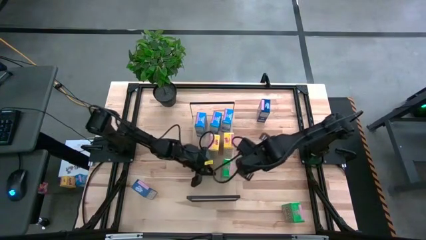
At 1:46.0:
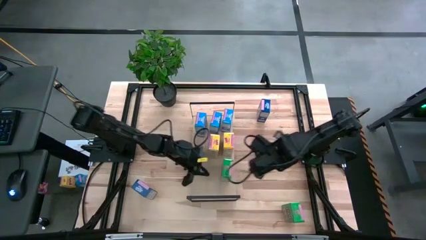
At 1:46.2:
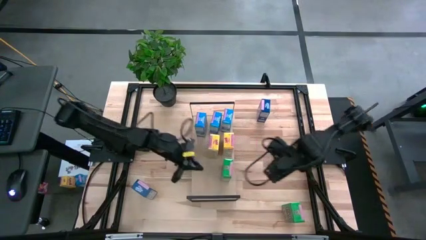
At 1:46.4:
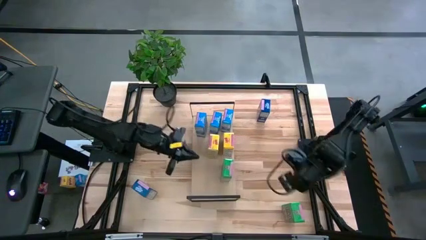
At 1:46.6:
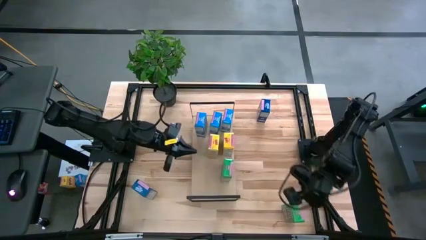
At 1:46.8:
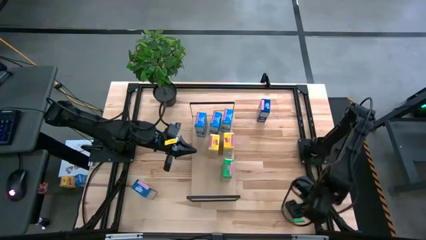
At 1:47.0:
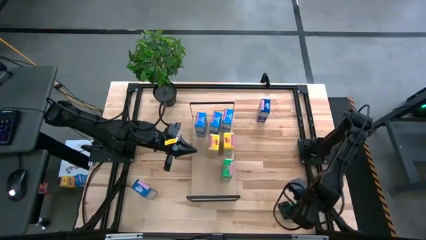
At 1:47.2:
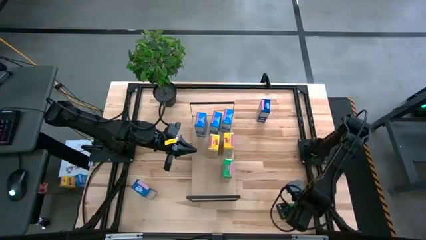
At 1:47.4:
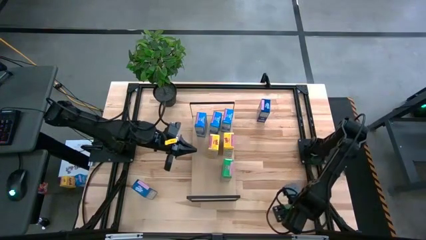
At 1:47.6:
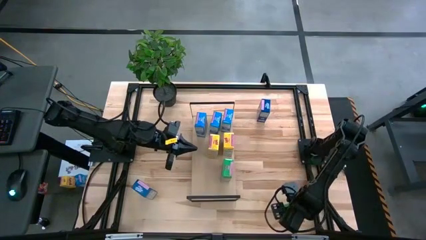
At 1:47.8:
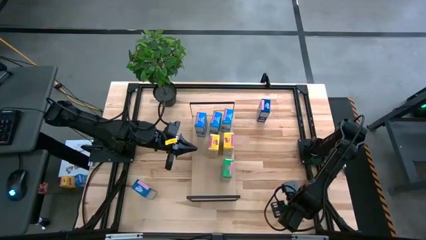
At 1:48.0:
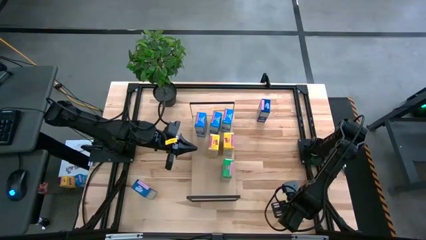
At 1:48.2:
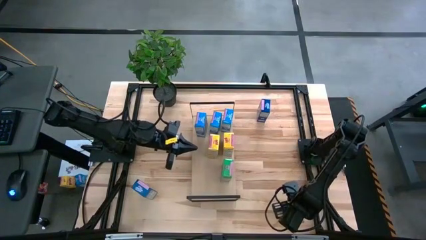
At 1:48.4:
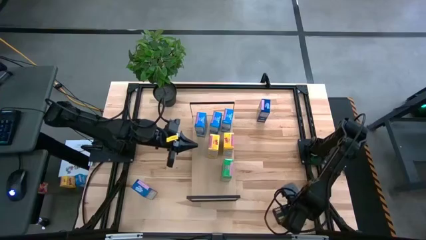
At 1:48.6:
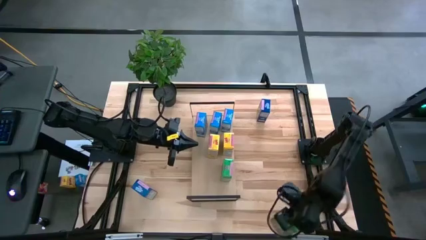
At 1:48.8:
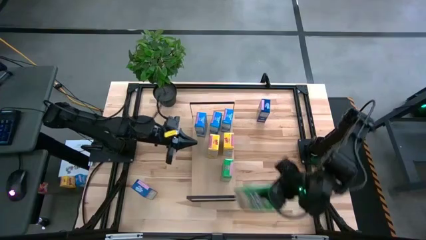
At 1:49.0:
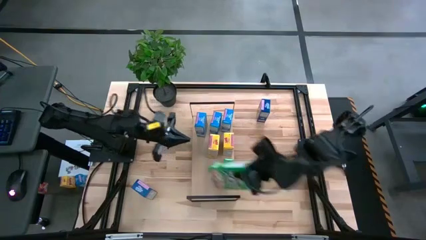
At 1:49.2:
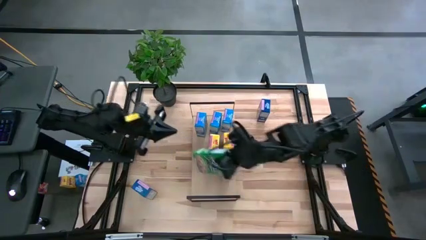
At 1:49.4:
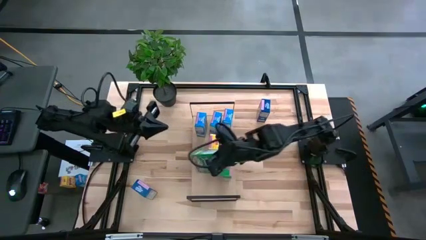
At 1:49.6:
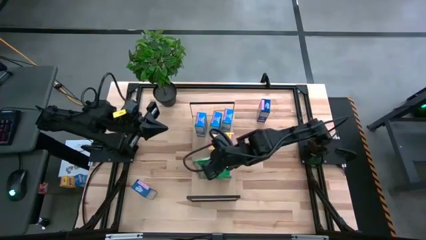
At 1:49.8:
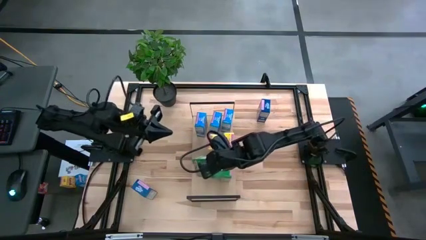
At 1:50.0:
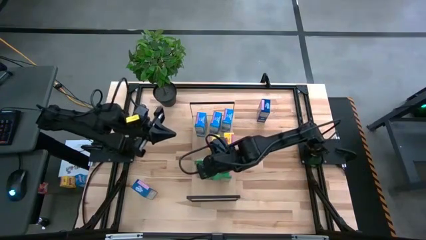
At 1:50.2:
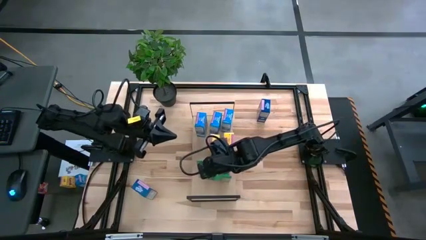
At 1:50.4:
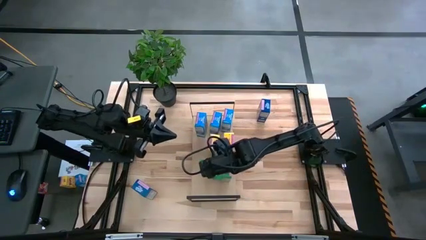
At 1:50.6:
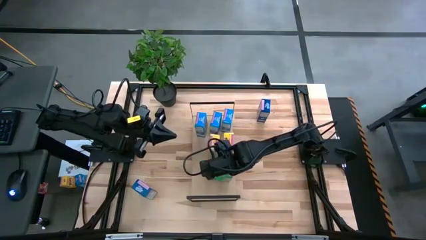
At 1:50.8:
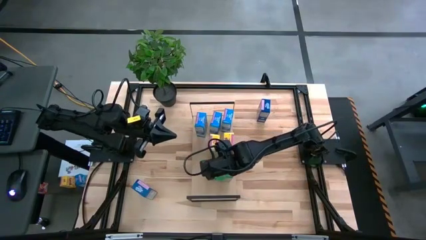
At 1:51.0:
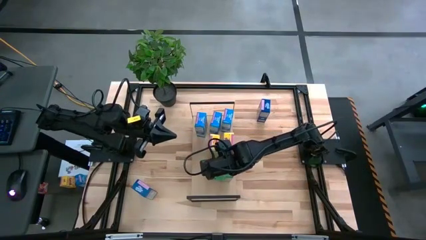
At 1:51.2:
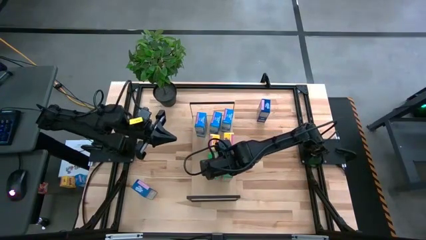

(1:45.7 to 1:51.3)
Task: Stack cereal on shelf
Put the green cereal box on the shelf aligned with the other green cereal box

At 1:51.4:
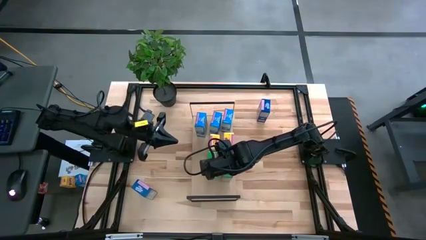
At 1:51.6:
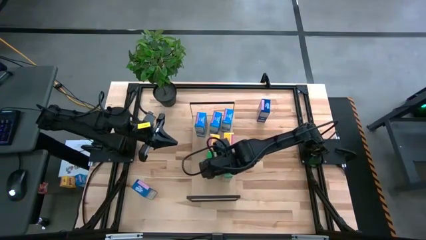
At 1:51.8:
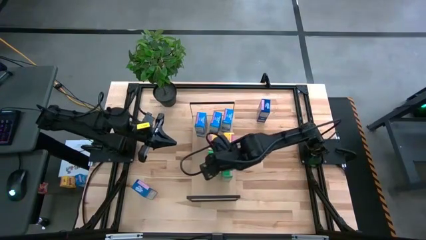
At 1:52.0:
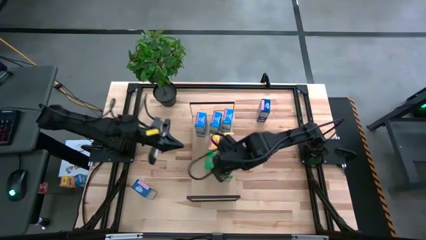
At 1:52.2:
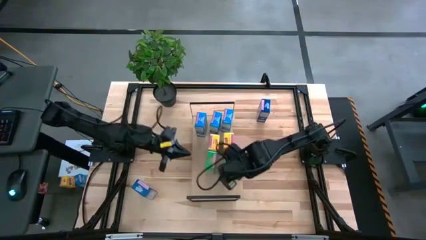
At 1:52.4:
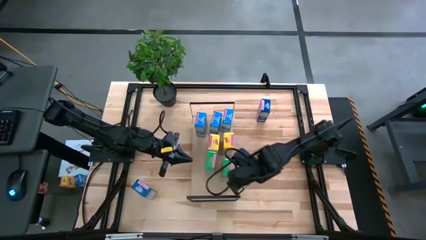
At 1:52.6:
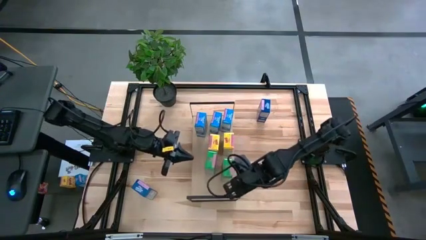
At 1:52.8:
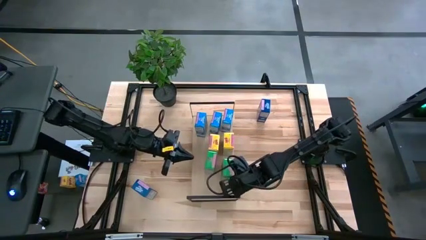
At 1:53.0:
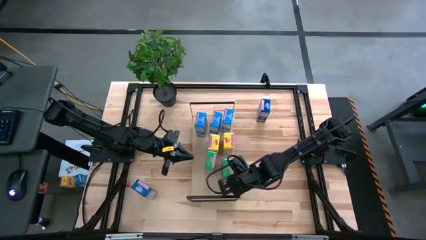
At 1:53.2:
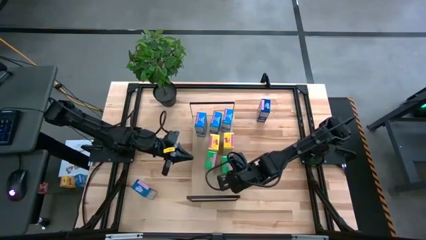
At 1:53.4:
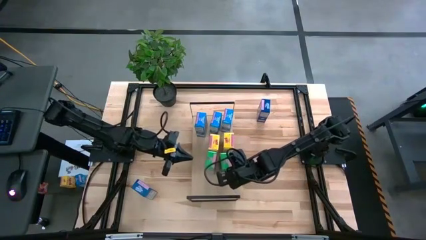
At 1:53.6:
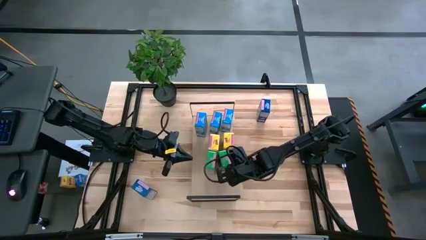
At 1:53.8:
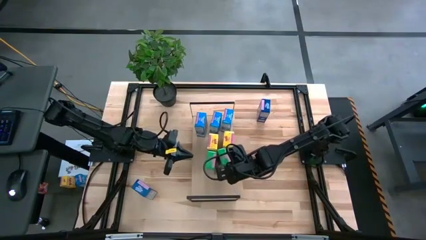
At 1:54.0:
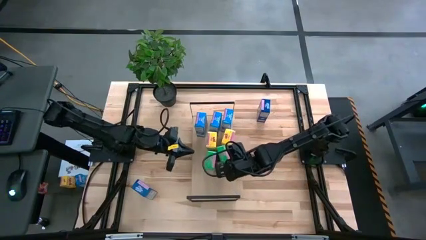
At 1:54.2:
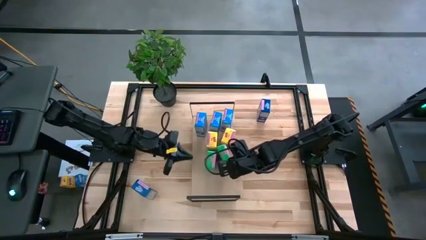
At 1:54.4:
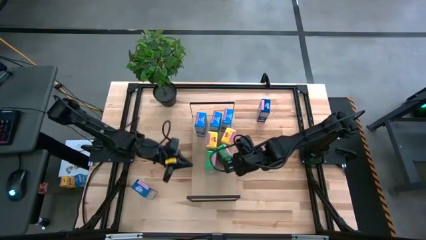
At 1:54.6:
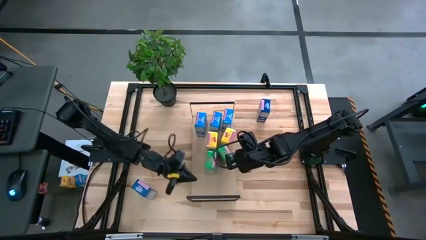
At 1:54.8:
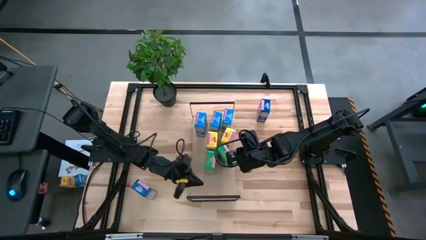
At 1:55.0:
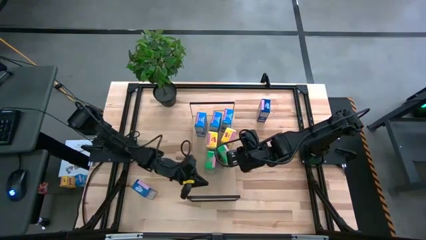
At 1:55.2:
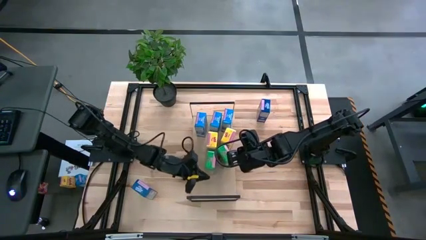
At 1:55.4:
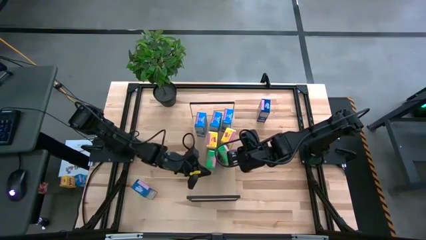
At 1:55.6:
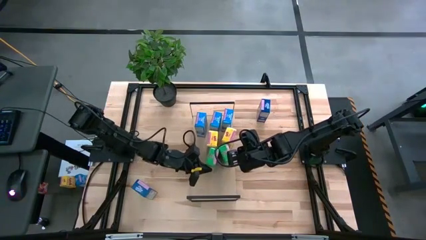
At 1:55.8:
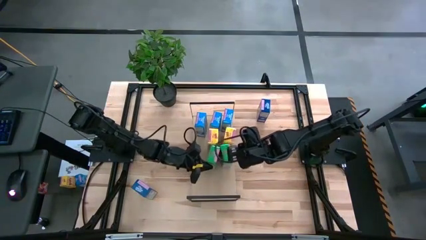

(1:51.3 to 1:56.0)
Adjust the green cereal boxes

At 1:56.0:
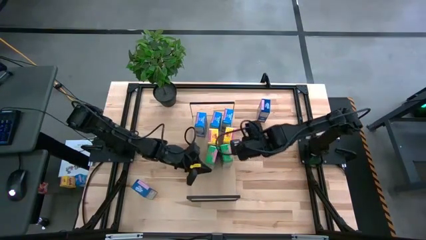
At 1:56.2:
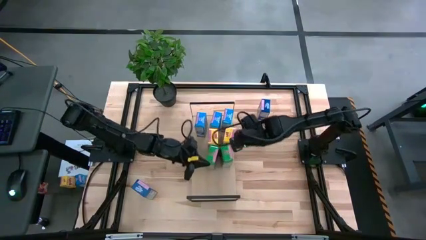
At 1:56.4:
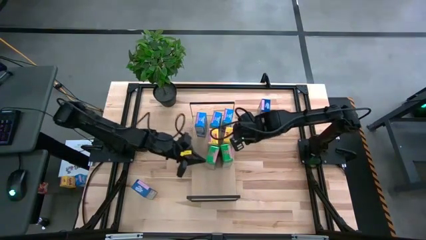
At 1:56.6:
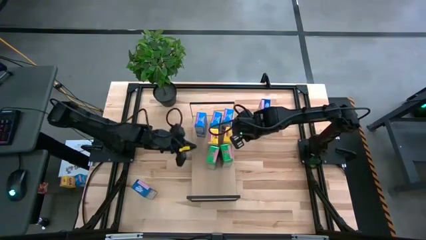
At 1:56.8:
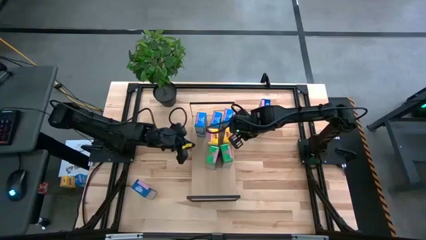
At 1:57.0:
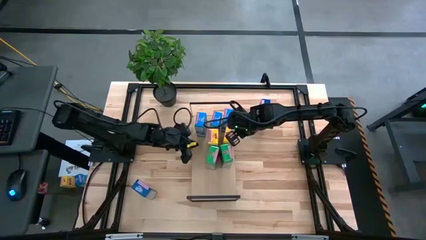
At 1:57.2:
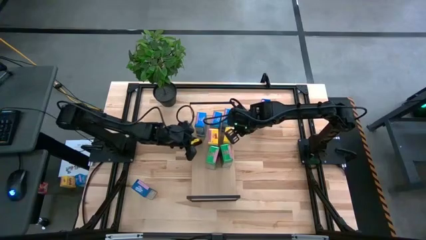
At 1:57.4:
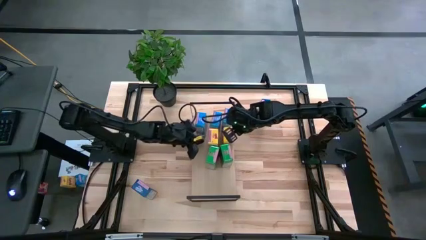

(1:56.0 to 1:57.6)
Adjust the yellow cereal box

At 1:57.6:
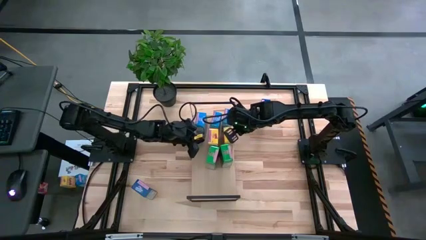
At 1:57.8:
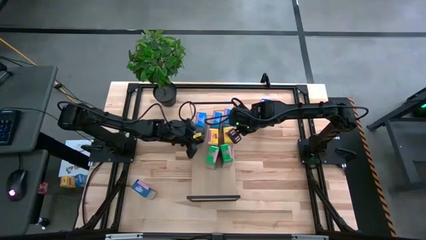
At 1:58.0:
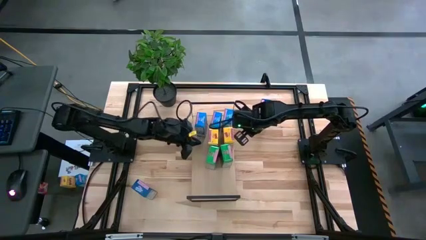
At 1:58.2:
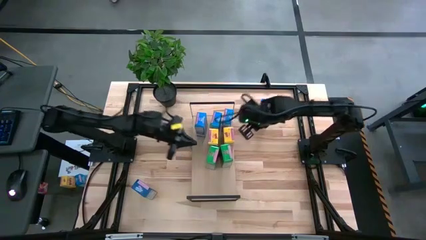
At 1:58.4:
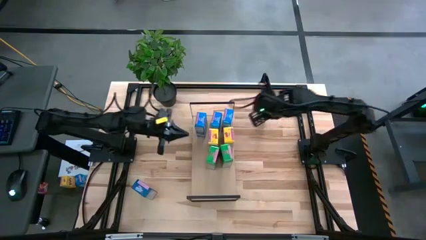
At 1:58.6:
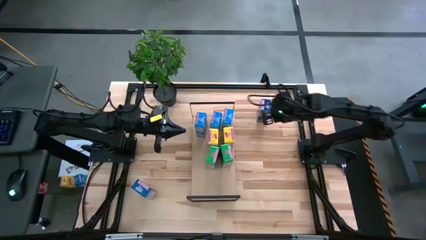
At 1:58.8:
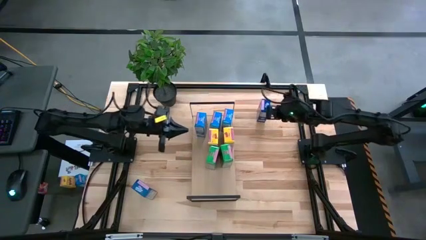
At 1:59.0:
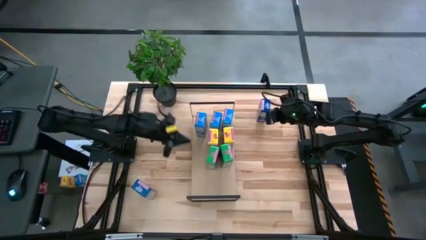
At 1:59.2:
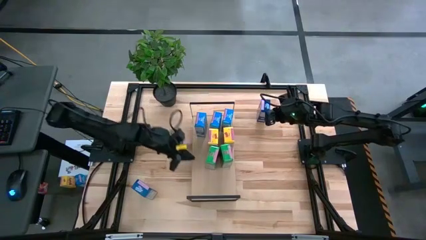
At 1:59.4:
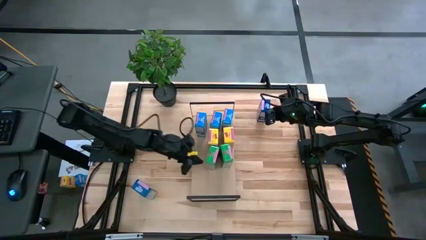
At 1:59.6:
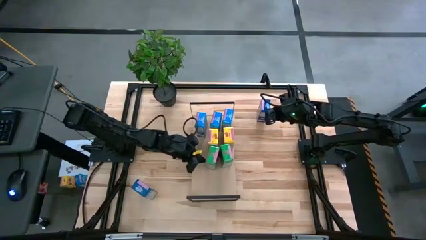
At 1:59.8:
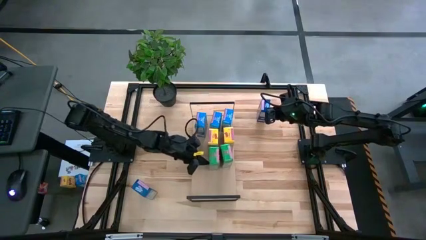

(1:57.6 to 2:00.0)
Adjust the green cereal box

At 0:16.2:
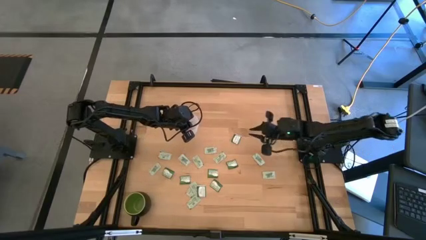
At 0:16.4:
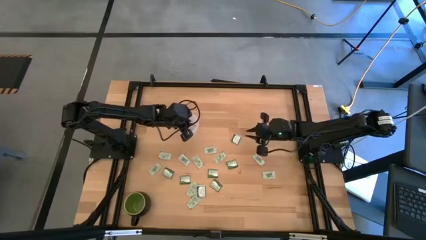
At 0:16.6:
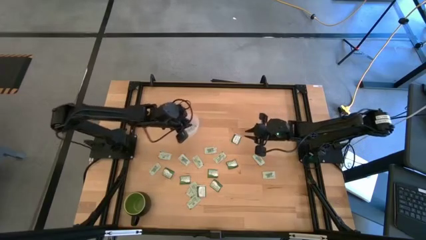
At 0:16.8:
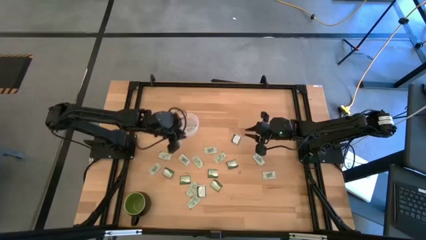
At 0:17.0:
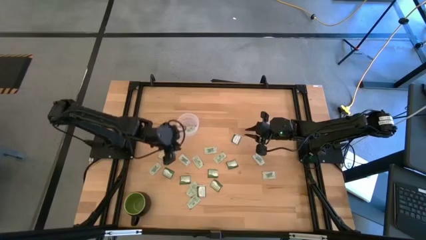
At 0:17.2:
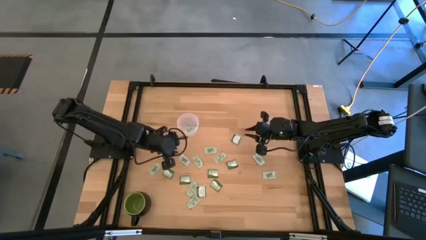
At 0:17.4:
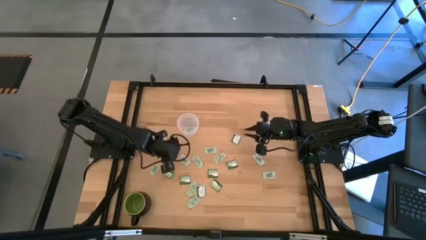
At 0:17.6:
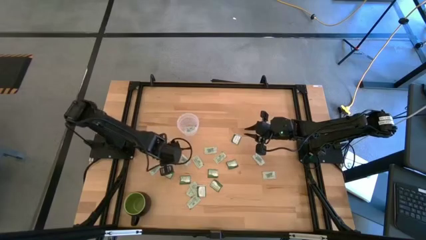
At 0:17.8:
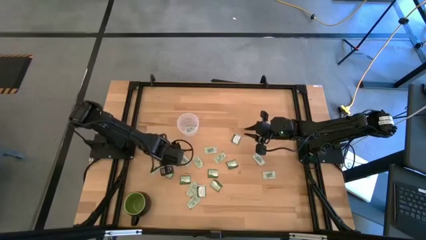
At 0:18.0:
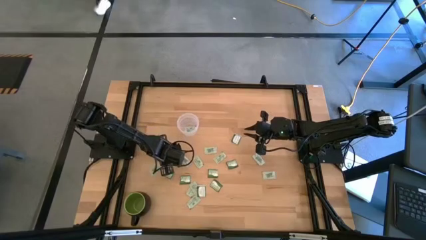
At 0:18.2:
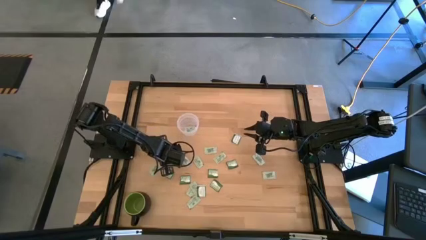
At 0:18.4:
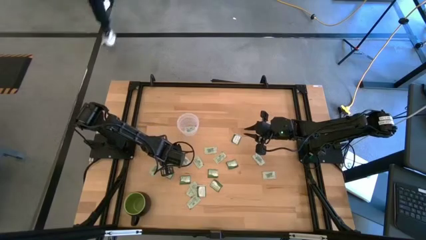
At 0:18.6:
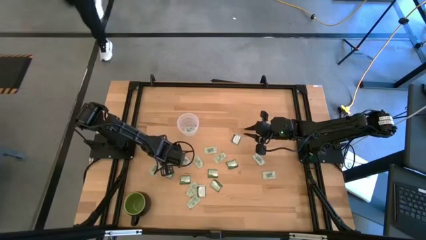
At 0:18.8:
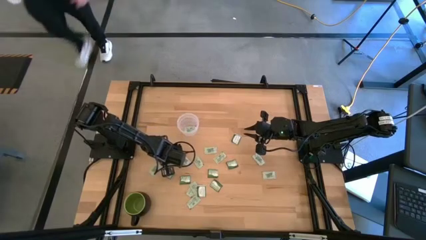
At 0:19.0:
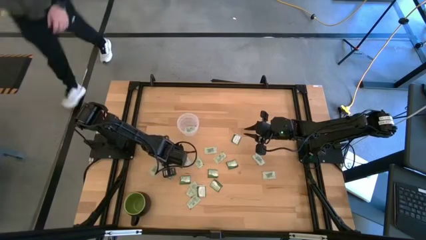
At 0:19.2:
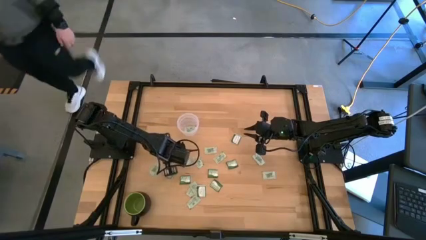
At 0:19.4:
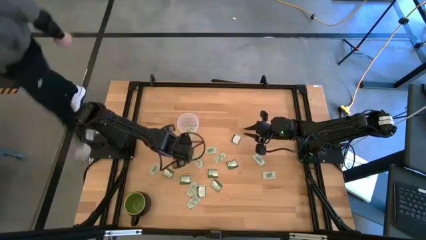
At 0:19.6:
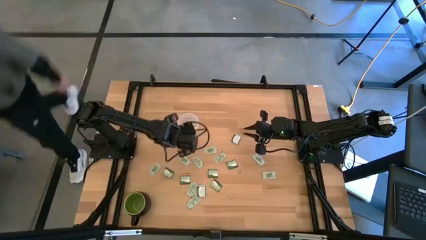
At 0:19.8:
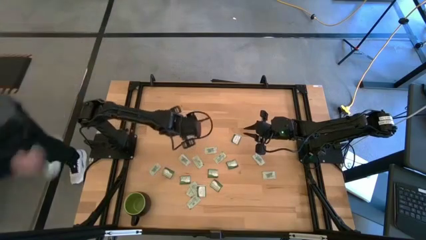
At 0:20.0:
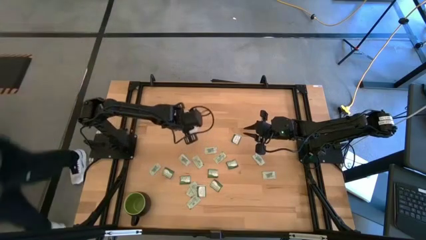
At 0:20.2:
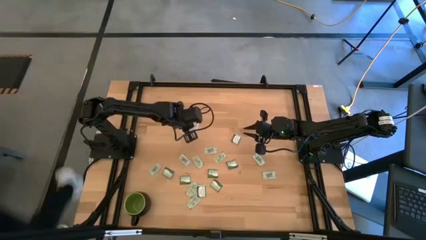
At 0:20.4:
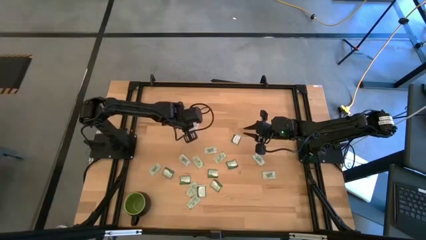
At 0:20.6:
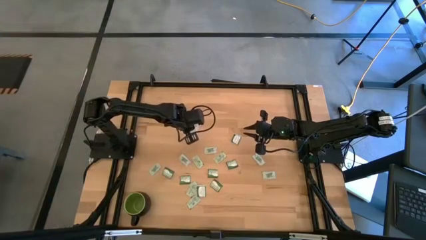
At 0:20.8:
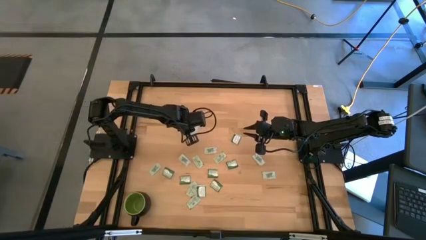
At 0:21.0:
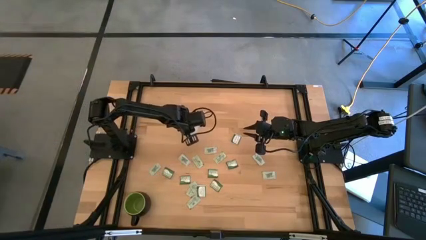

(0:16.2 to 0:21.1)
Task: Pick and place Stevia / Truvia into bins
Put the light green stevia packet into the transparent container
